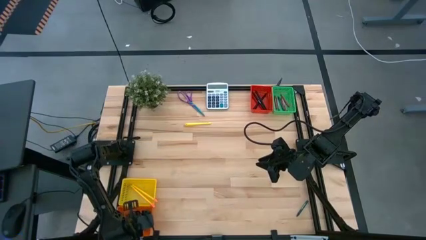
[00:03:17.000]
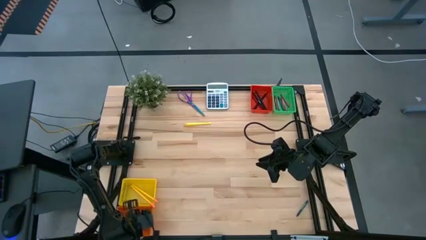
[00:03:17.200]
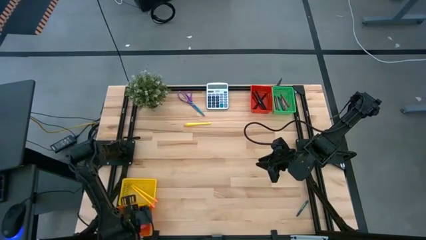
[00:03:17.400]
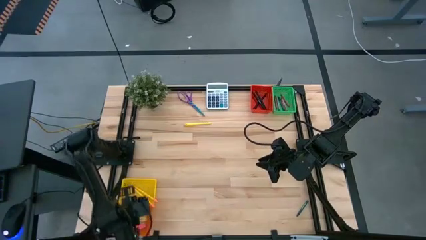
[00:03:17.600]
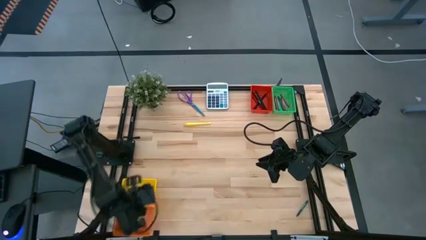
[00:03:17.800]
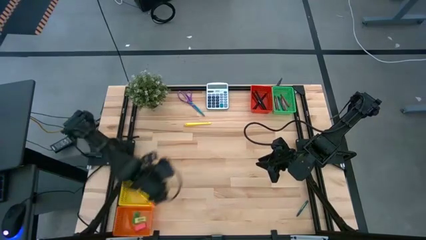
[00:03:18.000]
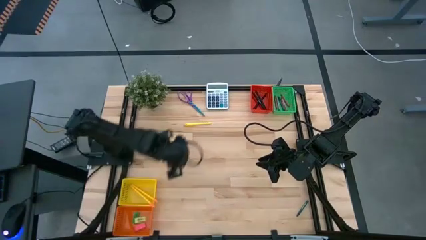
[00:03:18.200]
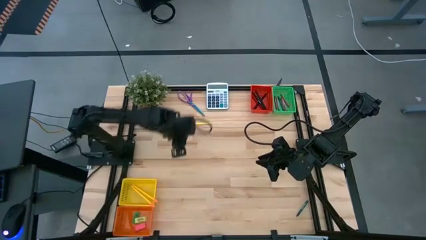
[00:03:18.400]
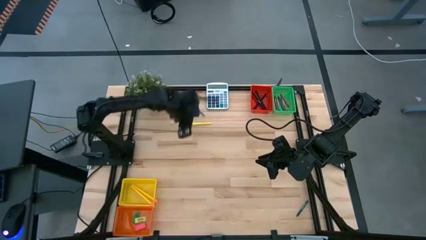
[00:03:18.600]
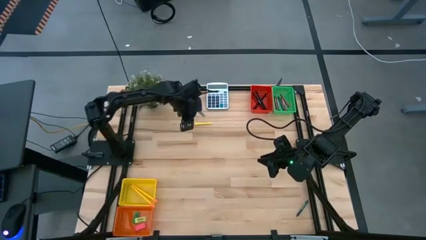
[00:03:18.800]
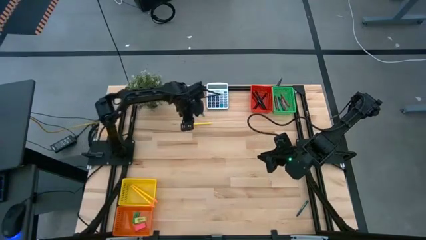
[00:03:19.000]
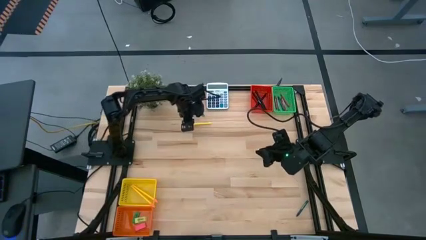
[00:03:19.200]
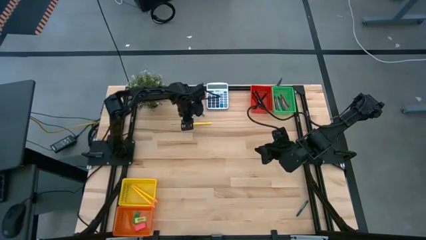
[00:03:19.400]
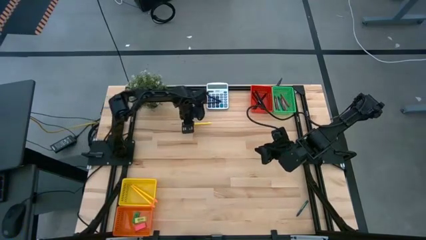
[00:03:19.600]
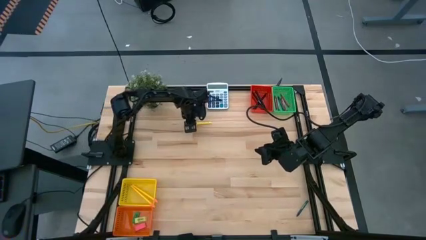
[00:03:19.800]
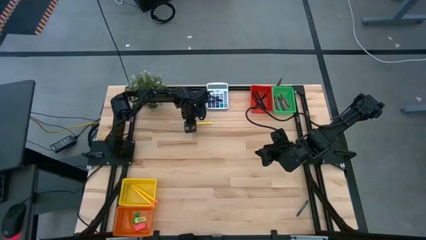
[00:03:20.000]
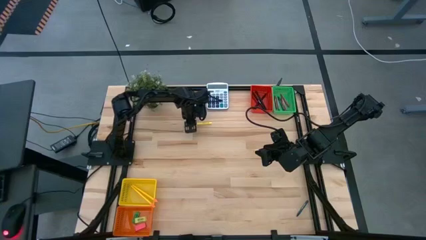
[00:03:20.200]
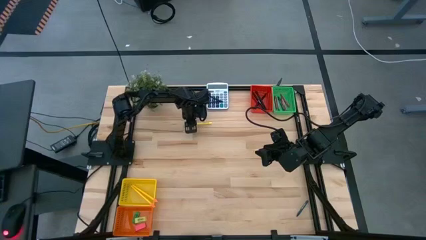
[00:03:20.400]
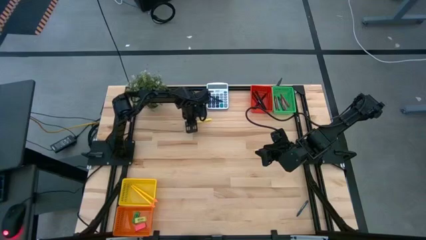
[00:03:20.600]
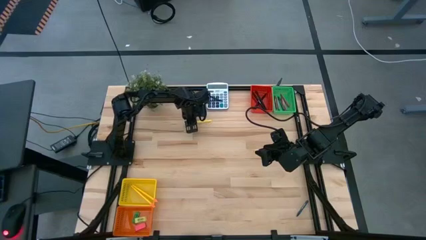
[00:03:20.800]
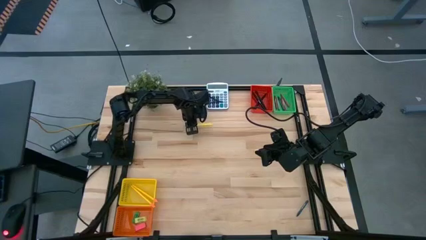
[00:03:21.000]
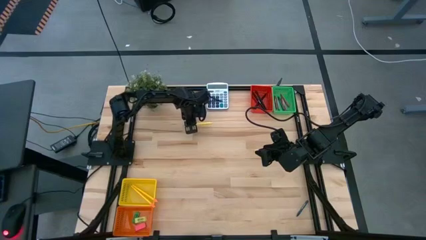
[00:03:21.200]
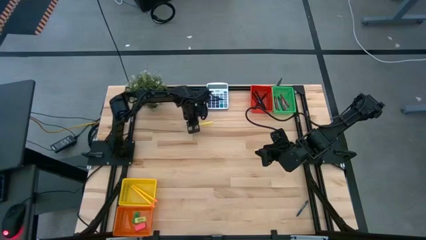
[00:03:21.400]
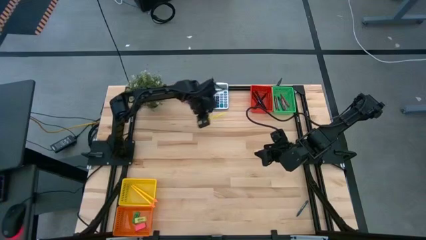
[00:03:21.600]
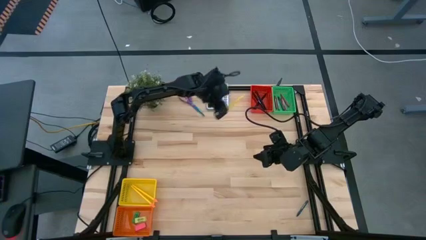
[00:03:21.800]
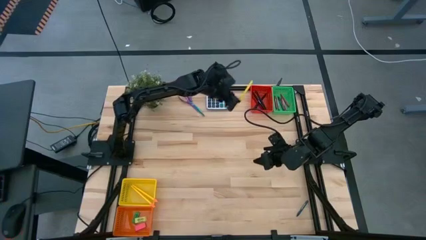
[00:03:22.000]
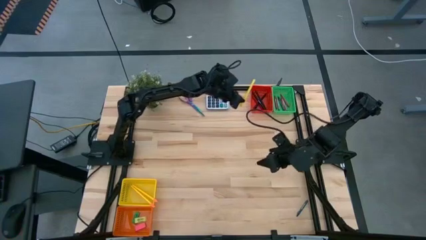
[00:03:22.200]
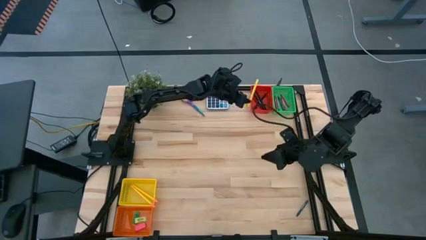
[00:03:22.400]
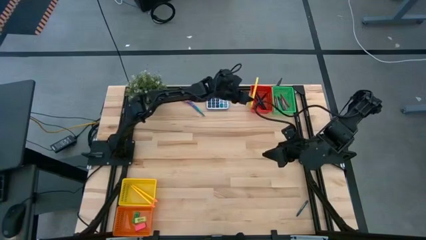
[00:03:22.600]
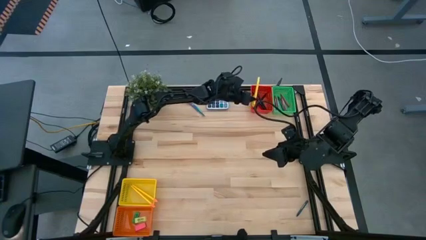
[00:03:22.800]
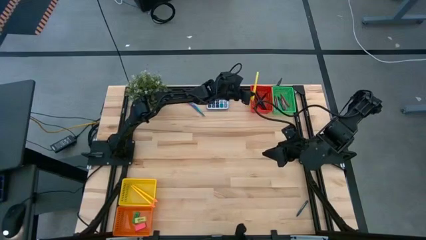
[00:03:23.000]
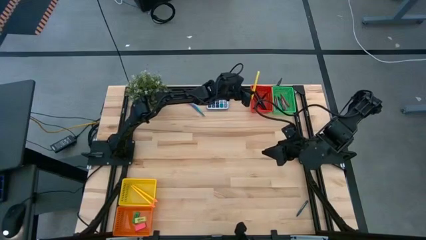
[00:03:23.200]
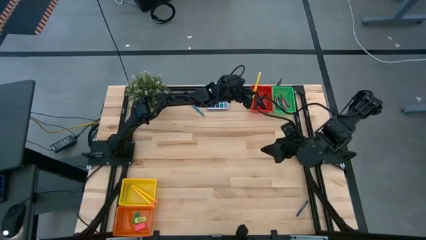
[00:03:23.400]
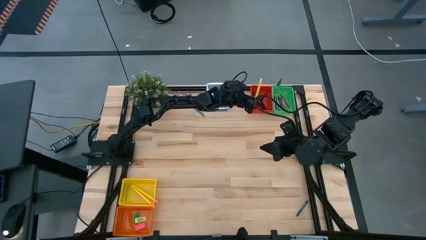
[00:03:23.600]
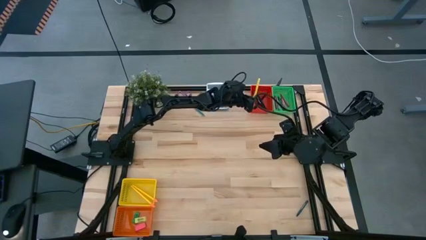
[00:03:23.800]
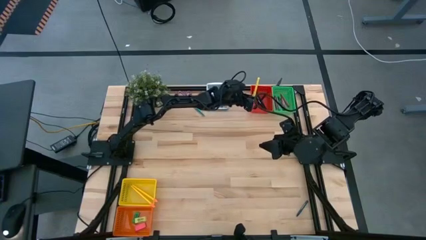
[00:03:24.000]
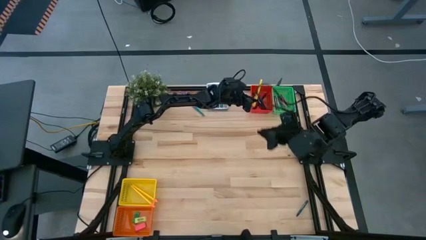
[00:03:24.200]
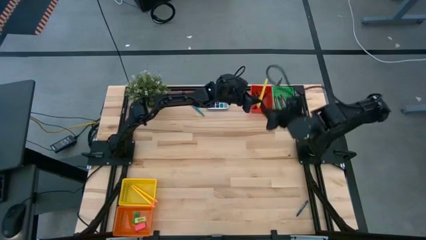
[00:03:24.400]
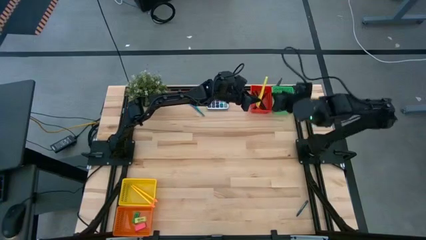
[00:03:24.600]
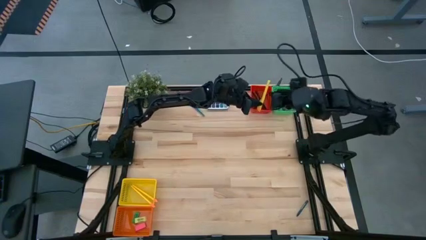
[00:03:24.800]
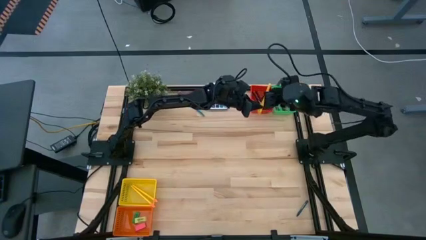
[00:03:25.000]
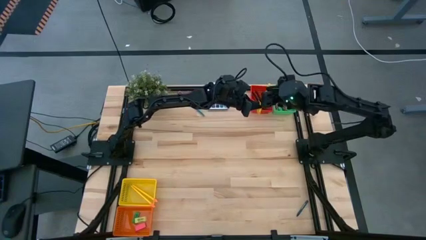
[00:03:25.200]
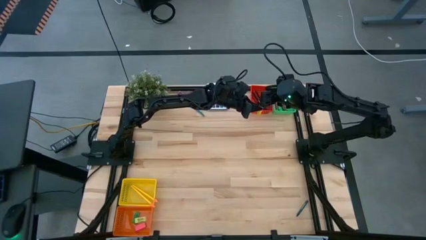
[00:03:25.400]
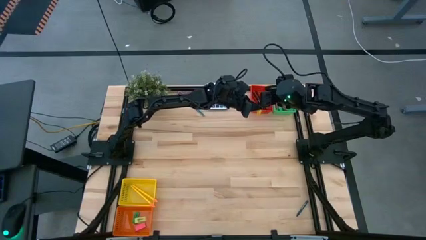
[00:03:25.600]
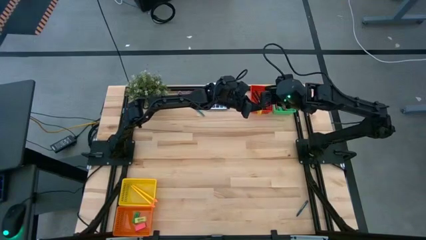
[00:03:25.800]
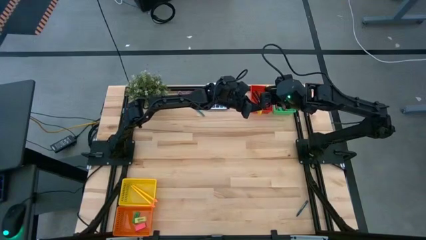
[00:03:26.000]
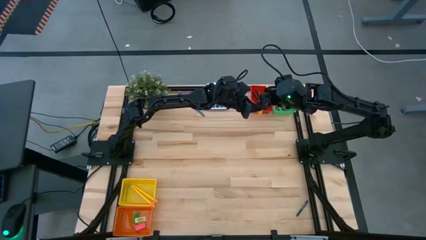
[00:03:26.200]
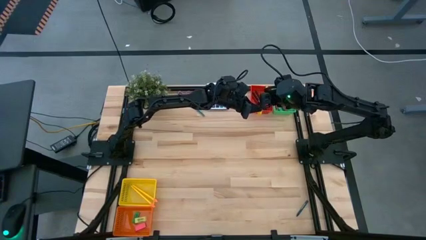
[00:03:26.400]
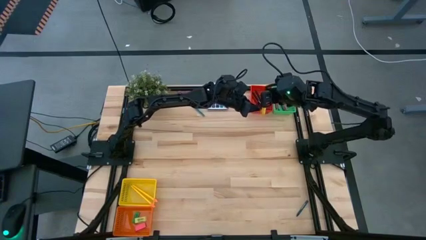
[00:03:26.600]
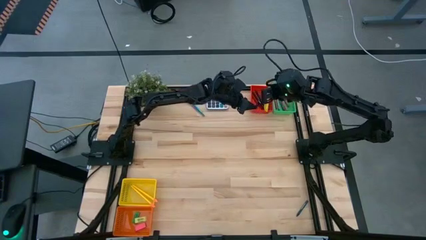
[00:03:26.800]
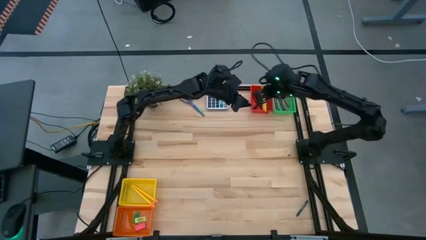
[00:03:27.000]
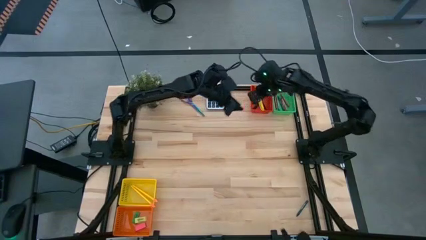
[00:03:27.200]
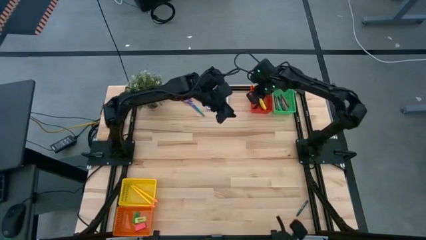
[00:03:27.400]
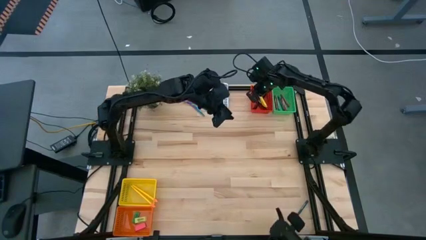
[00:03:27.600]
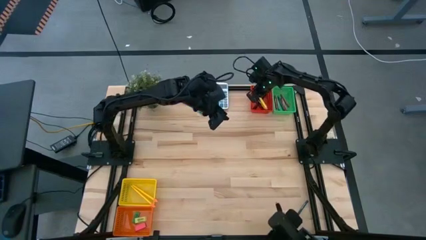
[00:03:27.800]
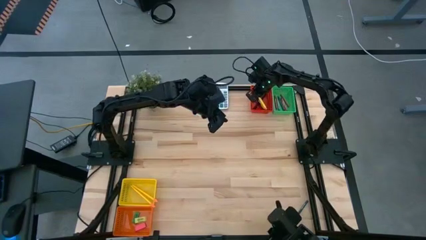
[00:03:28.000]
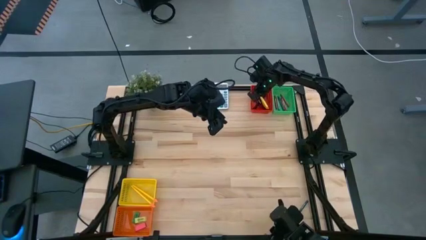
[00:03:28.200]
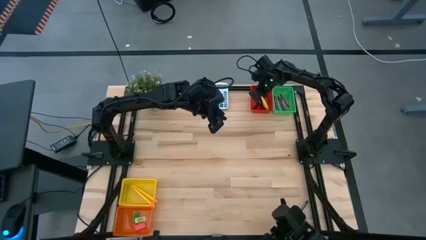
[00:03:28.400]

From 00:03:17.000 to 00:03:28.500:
Task: Sort crayons/erasers/pens/pencils in bins
Put the yellow pen into the red bin

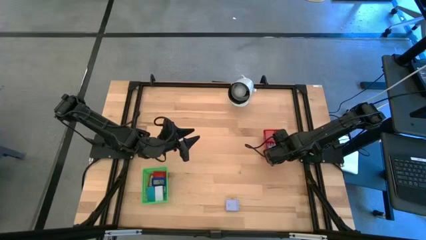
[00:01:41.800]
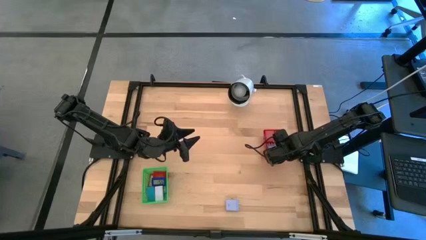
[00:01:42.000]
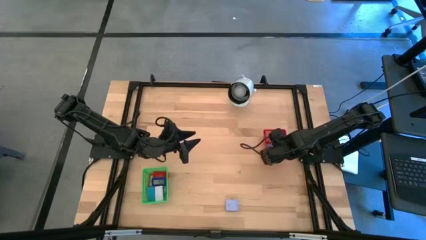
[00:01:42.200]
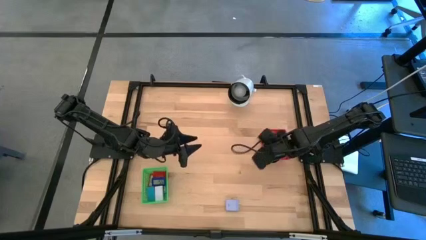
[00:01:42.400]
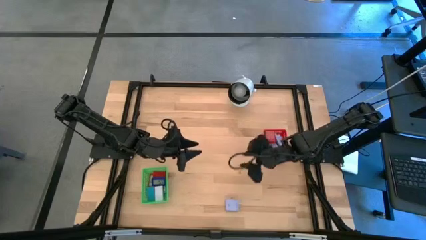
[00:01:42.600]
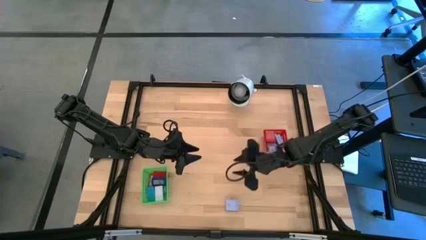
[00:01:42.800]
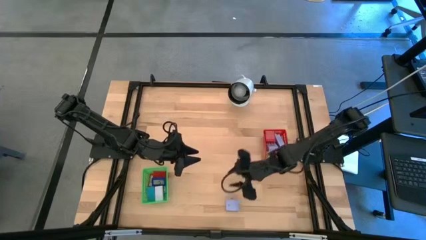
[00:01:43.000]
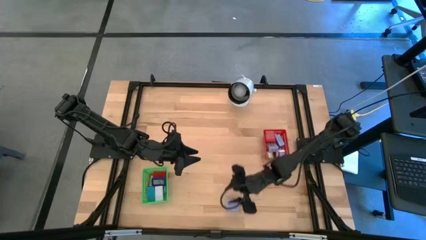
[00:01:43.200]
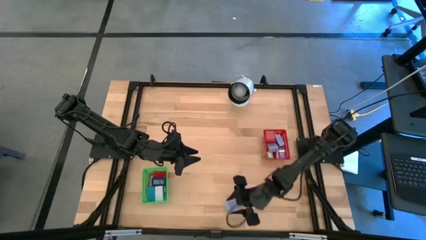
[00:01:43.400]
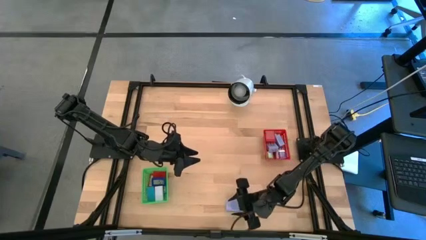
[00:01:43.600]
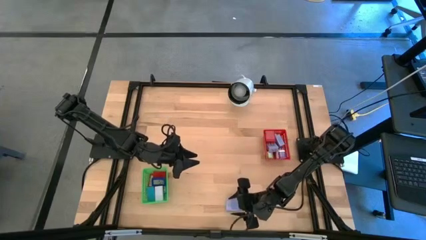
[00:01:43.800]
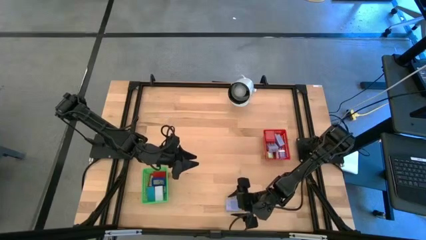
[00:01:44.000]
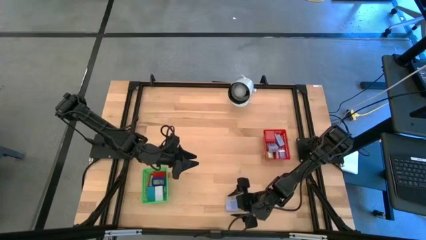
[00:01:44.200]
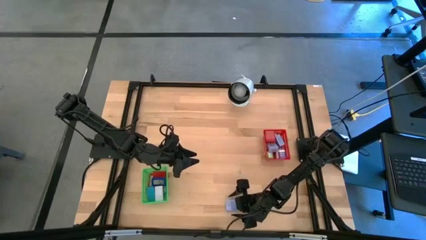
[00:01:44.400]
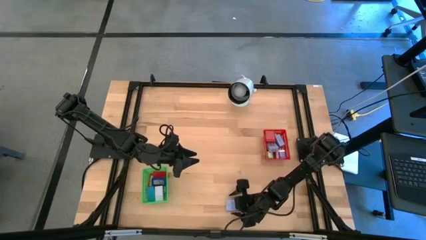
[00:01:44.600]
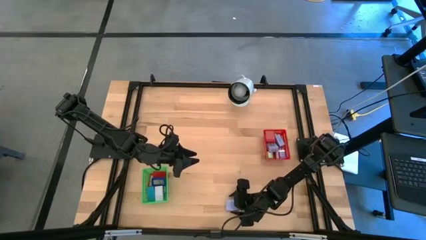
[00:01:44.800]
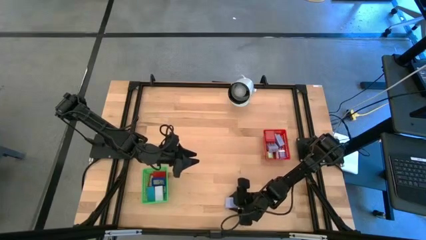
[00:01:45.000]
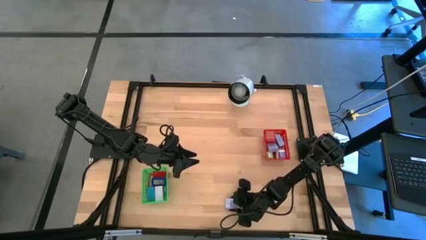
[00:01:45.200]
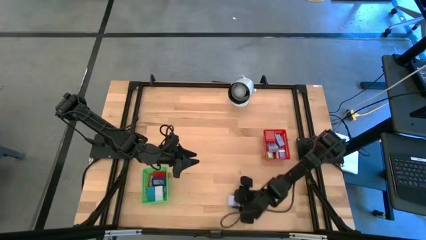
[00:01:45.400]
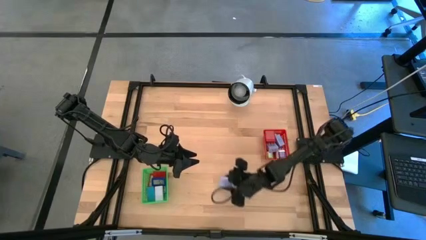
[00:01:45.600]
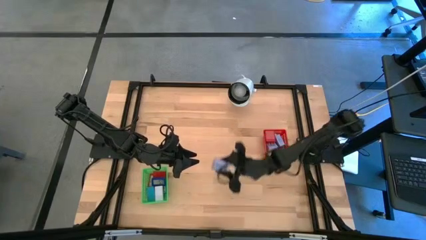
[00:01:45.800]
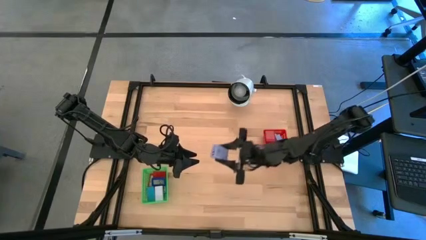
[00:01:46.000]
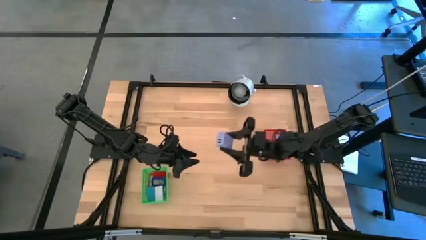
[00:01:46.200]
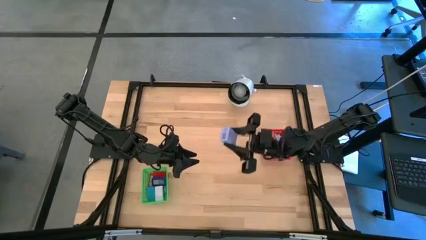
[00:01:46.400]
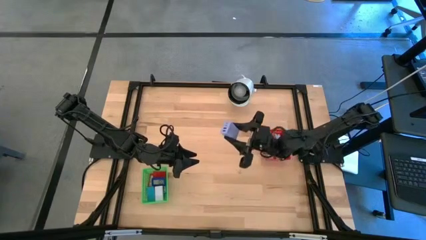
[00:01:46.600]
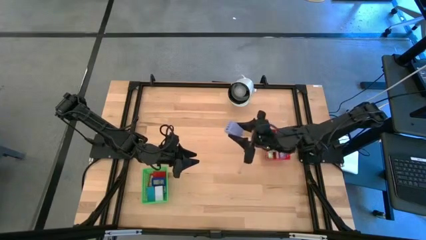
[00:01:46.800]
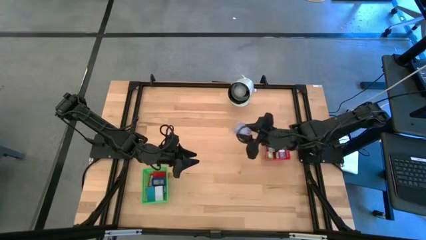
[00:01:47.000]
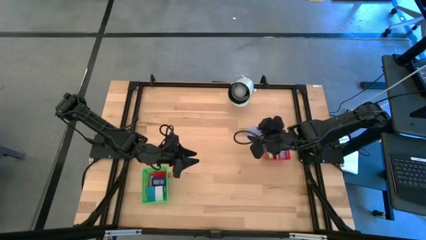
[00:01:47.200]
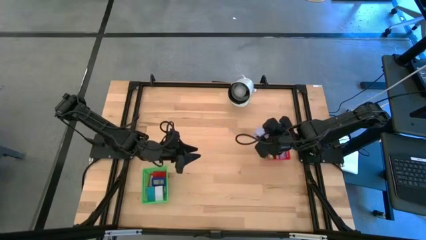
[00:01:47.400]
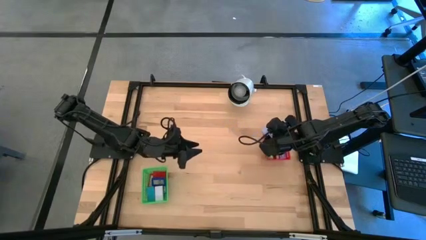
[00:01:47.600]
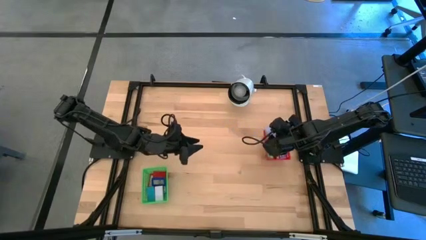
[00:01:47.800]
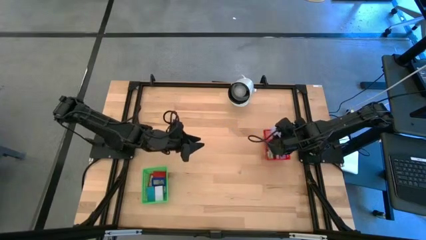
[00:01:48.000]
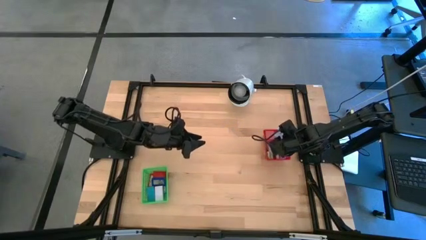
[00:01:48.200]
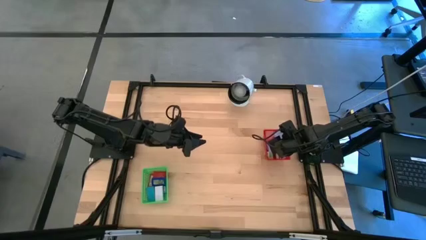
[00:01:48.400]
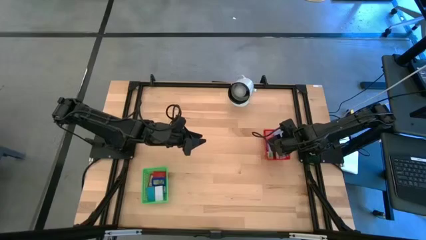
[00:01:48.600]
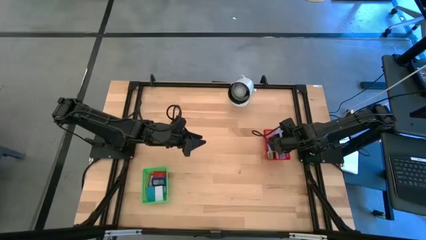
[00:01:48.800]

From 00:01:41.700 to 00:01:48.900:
Task: Pick & Place Office items
Put the light blue charger adapter into the red bin
